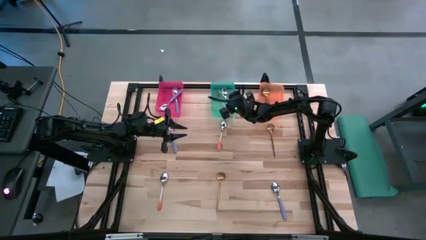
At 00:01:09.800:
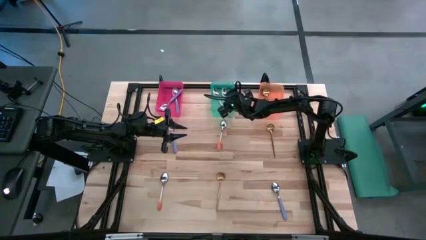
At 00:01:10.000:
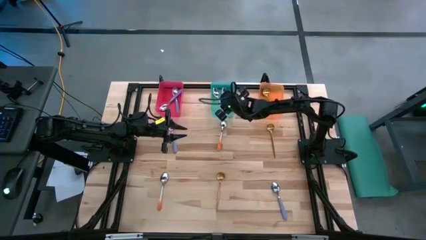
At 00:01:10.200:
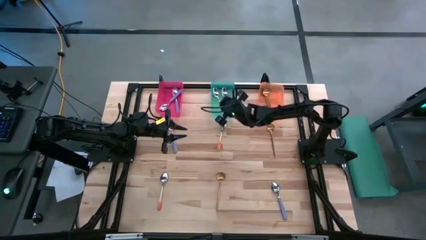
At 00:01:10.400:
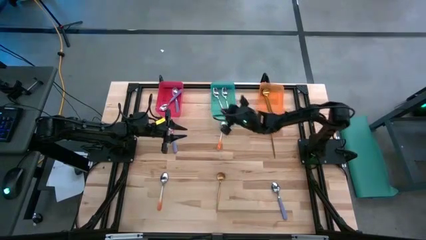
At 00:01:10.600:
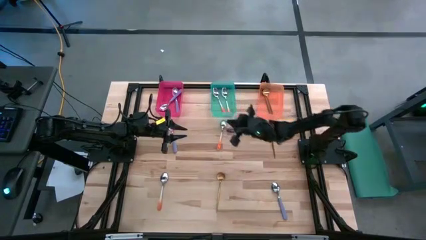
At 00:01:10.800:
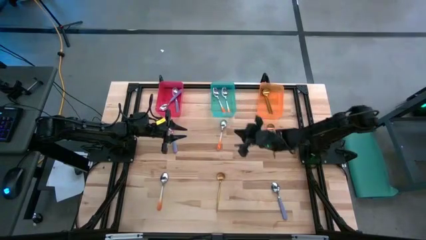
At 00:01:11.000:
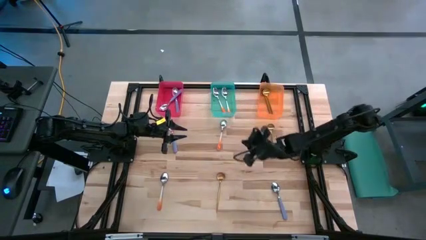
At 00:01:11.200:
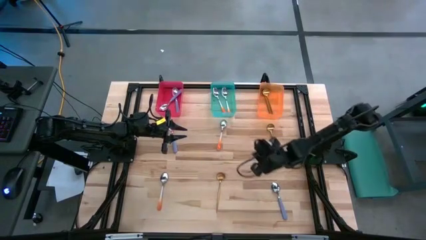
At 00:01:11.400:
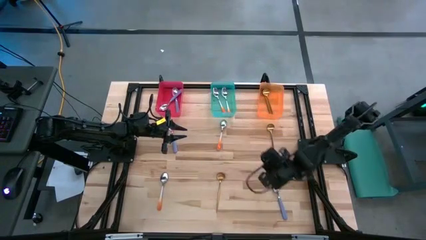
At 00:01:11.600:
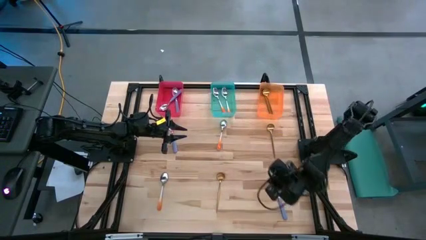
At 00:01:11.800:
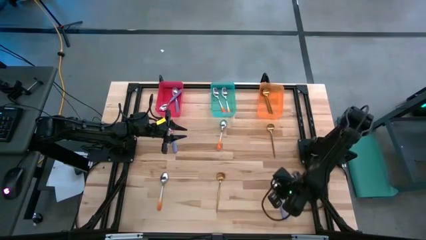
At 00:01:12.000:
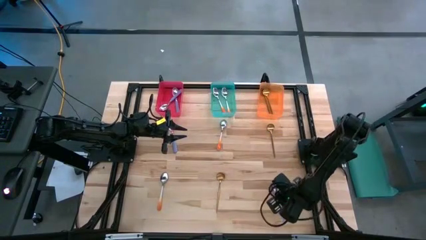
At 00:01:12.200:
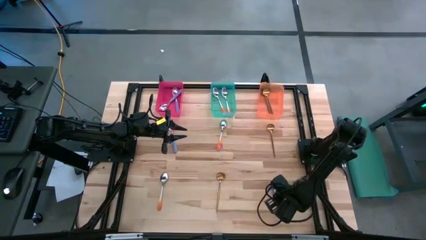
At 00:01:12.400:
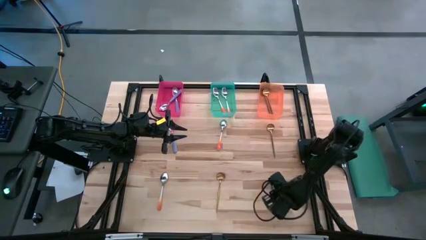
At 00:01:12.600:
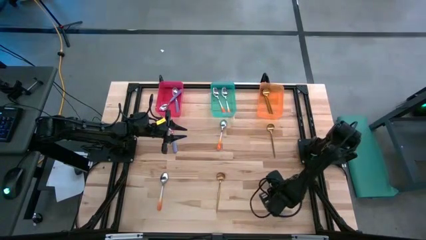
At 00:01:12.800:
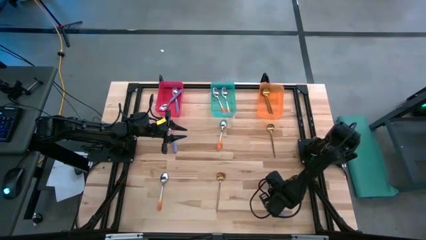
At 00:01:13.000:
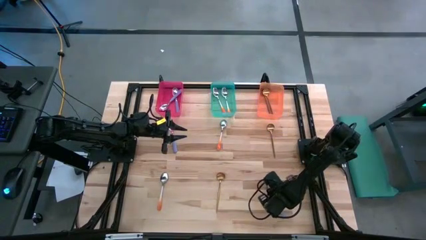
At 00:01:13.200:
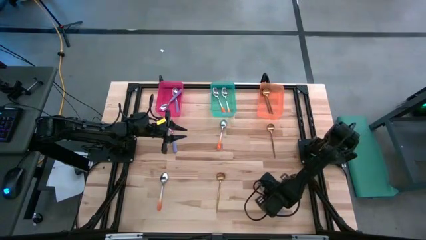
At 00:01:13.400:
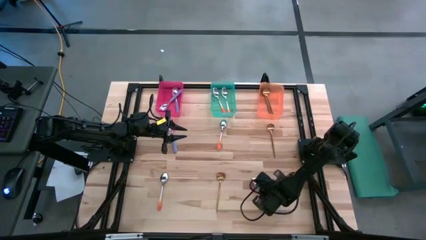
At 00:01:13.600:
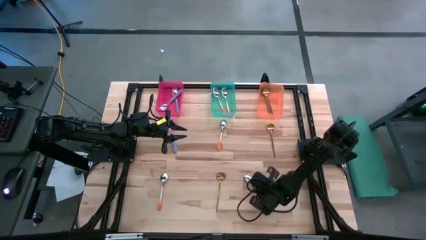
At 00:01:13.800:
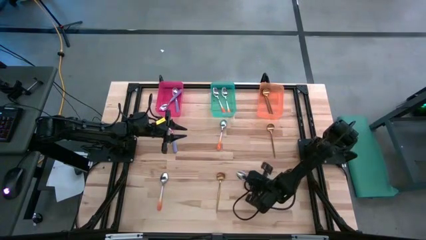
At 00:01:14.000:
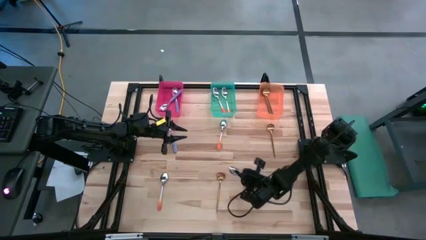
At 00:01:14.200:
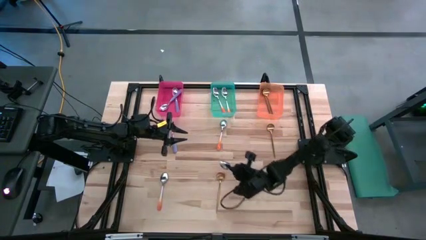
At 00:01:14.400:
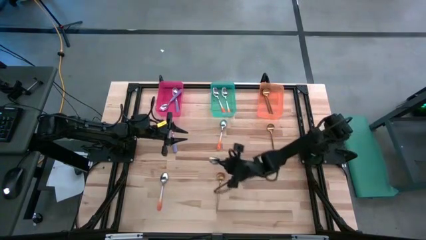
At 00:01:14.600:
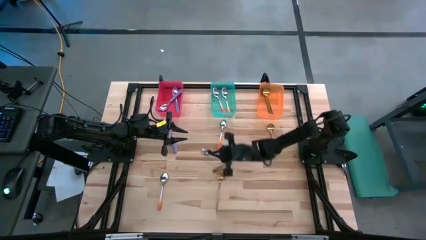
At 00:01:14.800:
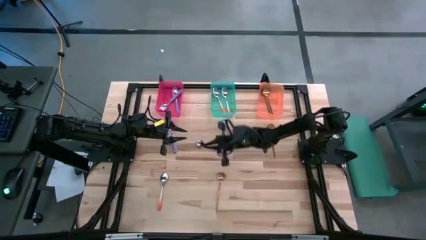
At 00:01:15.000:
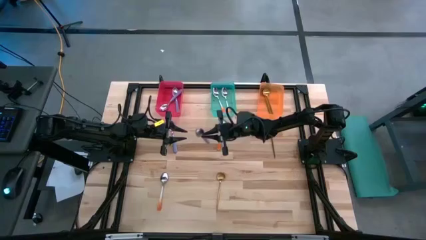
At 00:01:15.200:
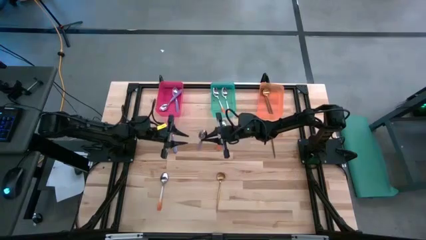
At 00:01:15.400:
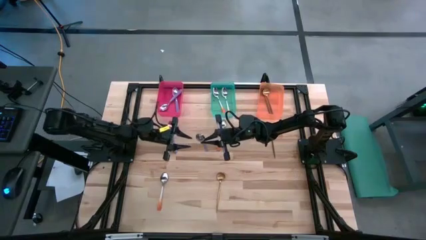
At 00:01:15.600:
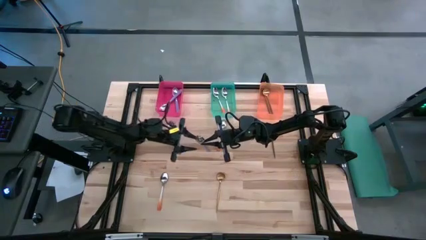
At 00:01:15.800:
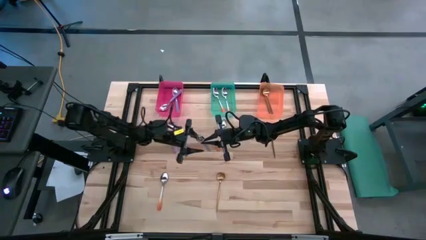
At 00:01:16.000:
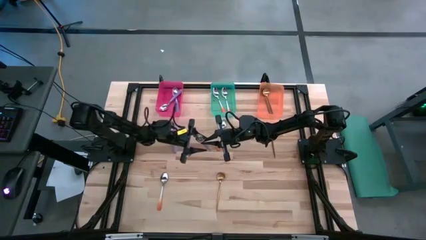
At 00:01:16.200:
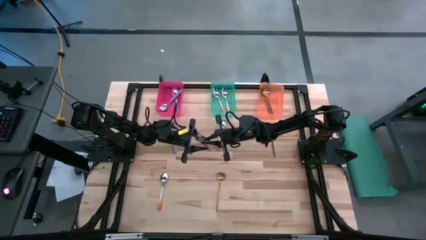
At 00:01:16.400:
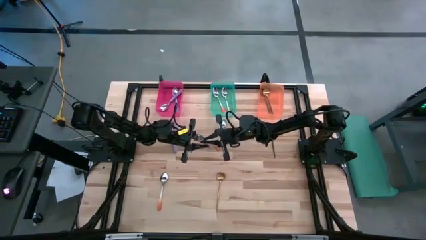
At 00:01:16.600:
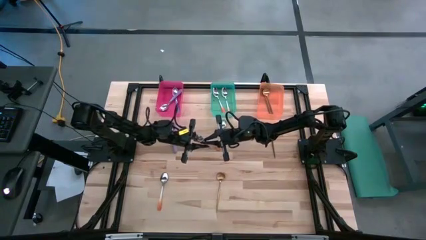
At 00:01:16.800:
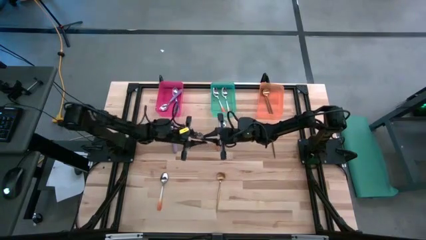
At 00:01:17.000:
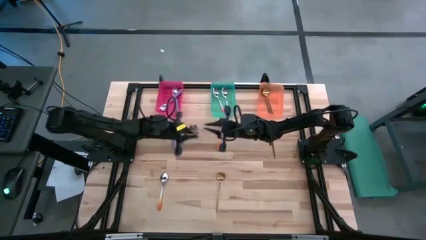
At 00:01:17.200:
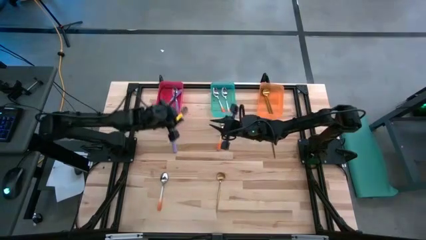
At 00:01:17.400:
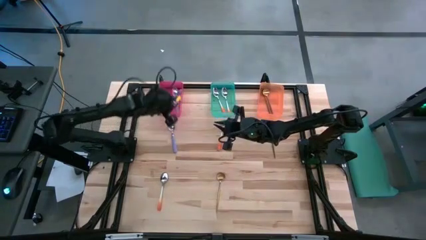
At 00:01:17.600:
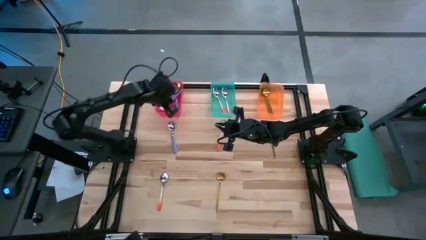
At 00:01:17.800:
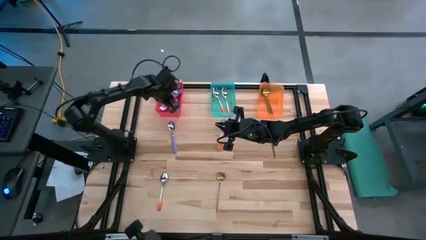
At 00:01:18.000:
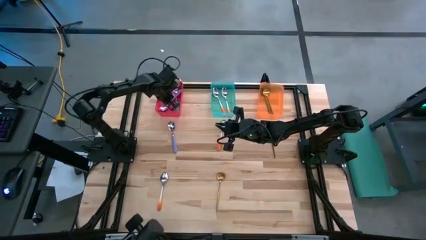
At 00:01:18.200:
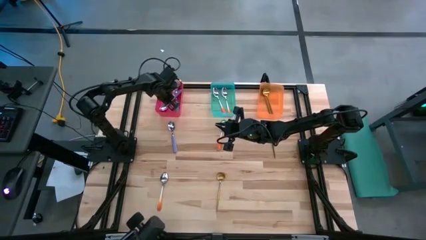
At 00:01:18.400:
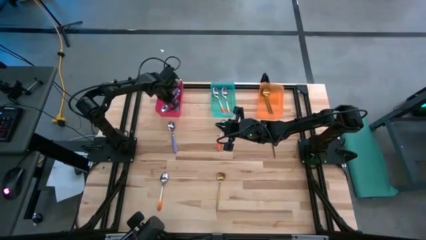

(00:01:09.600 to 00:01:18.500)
Task: Sort silverware by color (type)
Put the violet spoon into the red bin

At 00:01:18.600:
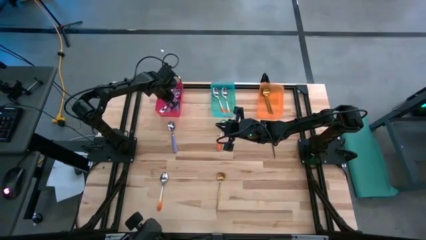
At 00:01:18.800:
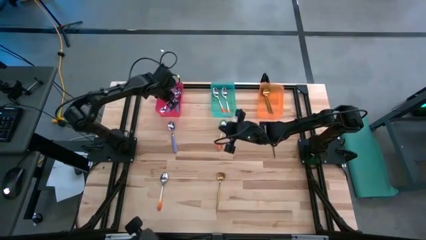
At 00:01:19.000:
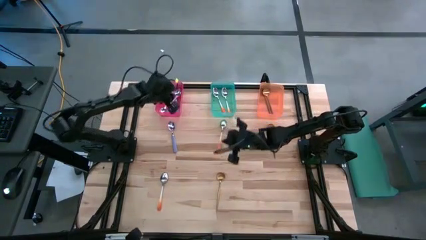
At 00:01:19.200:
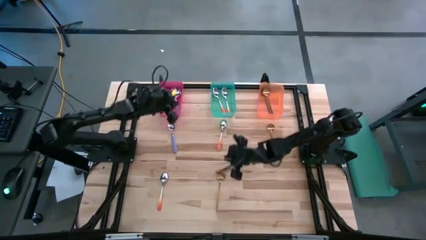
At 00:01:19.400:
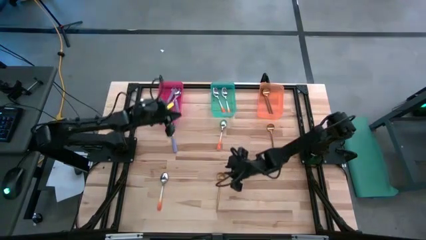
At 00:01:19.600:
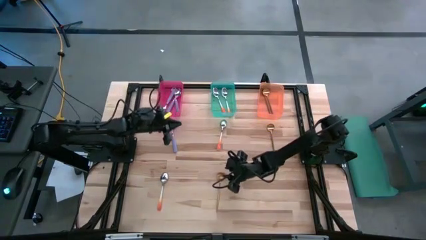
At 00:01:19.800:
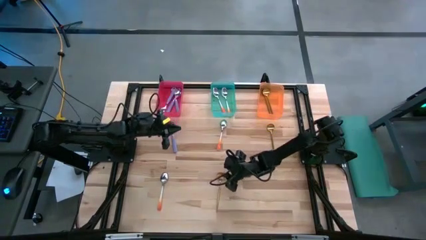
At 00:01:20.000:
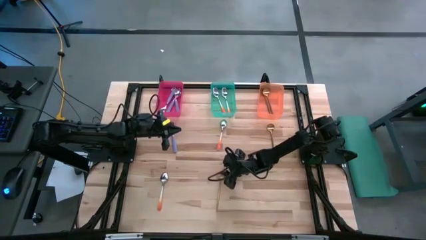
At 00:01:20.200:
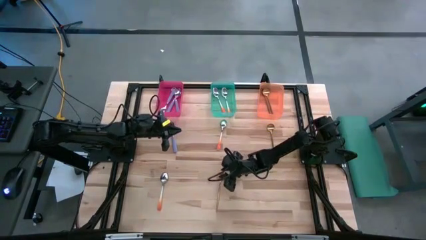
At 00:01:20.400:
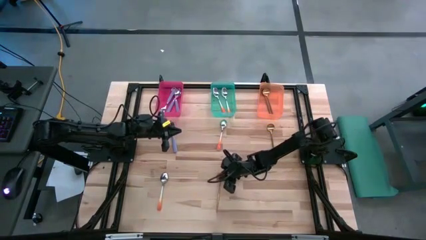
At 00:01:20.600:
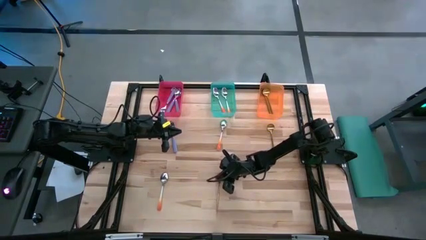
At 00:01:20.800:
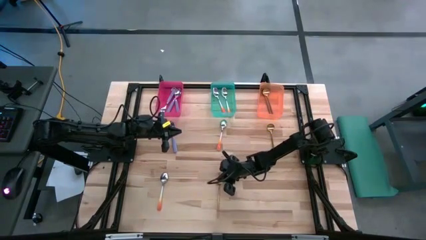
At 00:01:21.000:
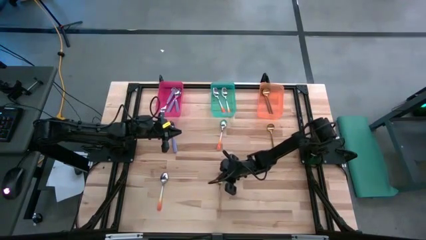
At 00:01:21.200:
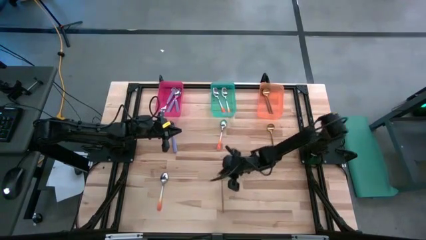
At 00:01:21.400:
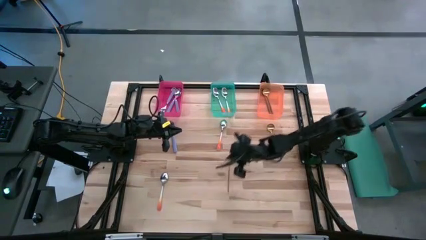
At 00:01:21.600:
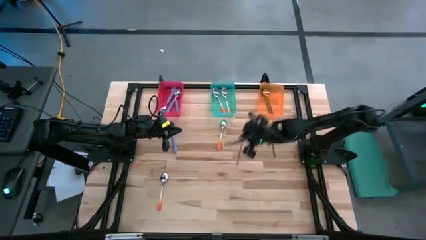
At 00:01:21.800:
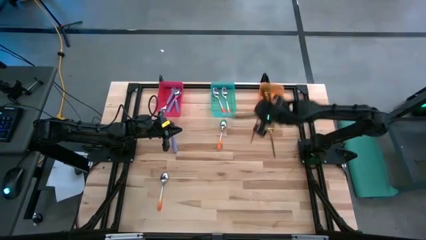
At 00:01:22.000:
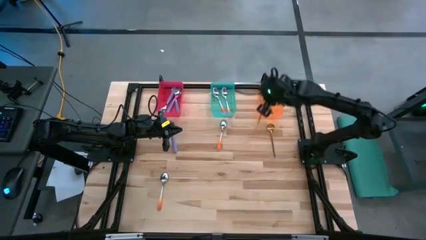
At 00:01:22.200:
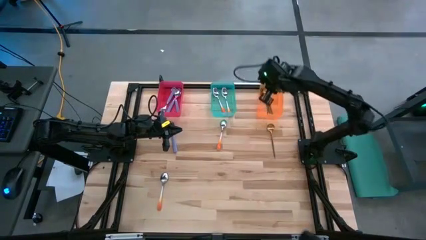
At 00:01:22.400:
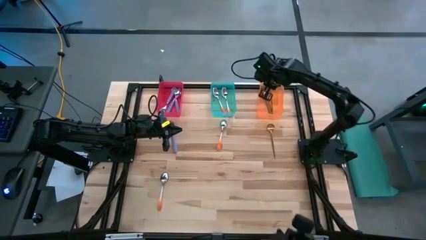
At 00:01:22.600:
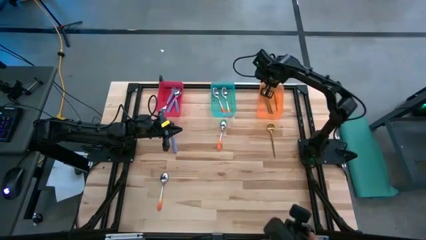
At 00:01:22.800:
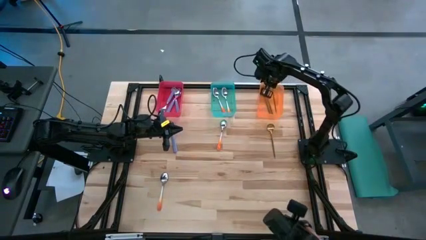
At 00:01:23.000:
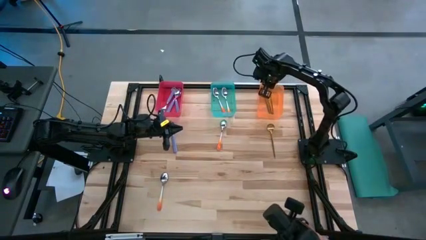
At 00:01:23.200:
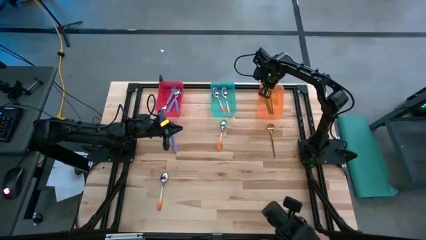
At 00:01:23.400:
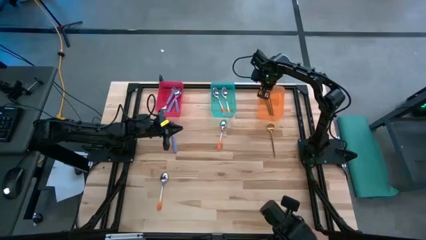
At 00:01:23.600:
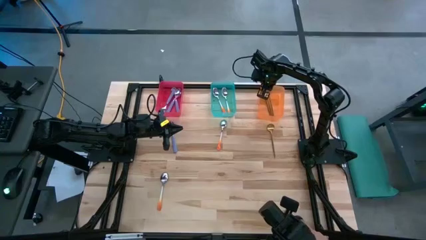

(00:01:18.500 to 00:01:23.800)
Put the gold spoon into the orange bin
